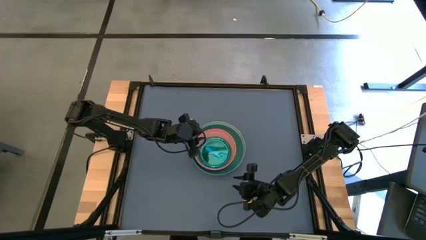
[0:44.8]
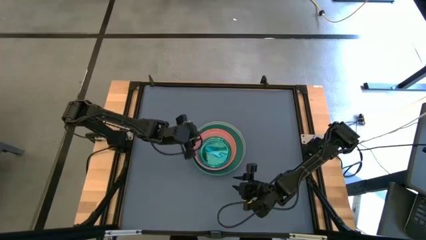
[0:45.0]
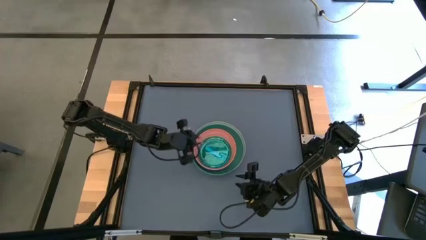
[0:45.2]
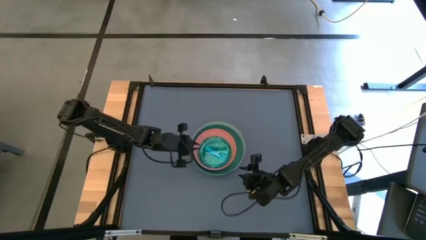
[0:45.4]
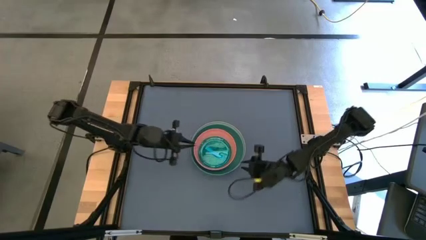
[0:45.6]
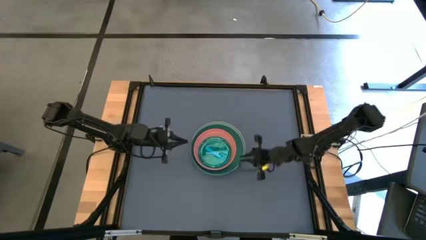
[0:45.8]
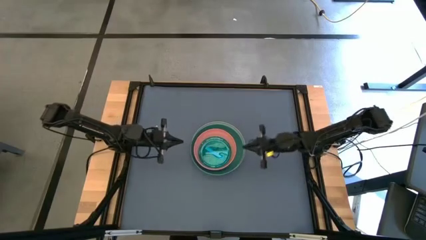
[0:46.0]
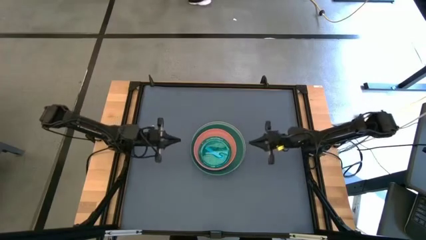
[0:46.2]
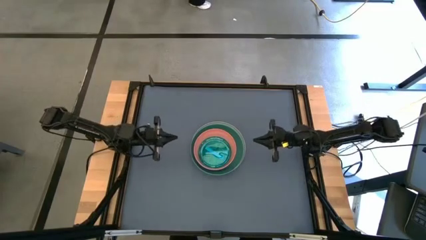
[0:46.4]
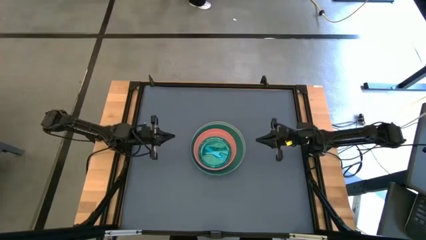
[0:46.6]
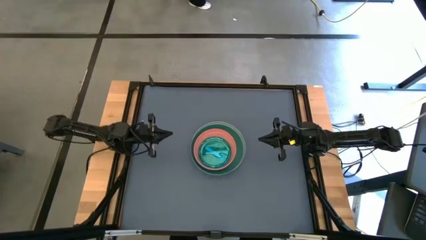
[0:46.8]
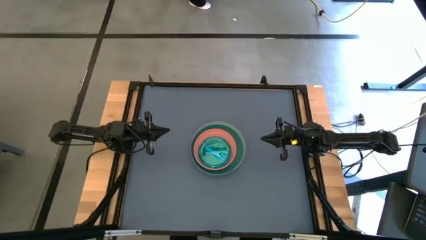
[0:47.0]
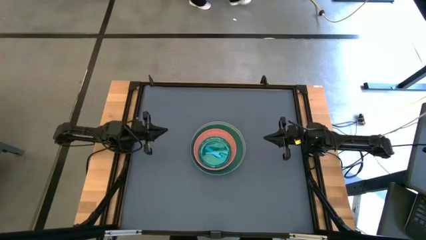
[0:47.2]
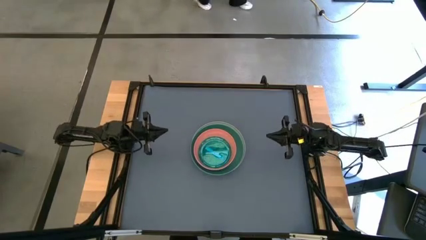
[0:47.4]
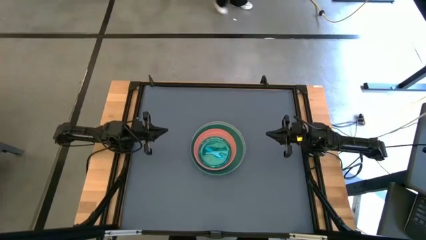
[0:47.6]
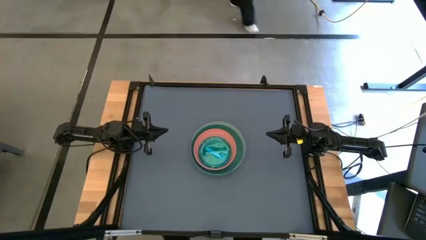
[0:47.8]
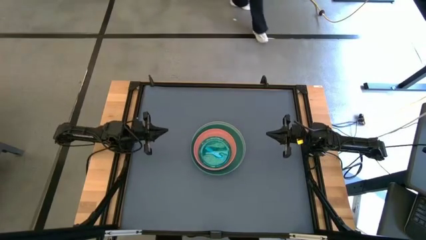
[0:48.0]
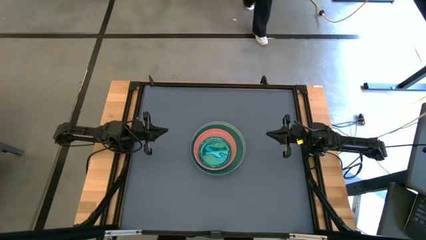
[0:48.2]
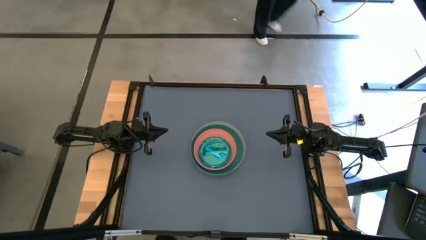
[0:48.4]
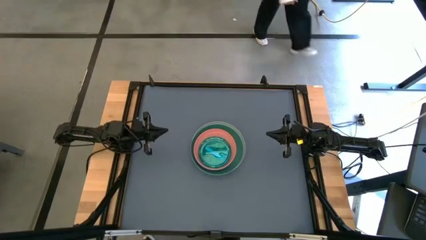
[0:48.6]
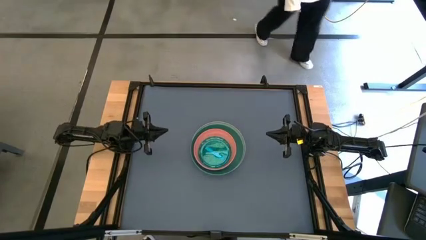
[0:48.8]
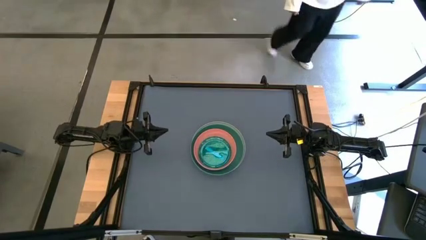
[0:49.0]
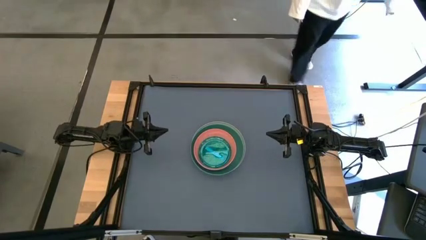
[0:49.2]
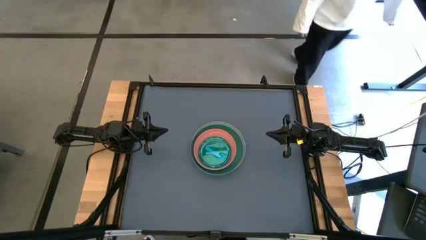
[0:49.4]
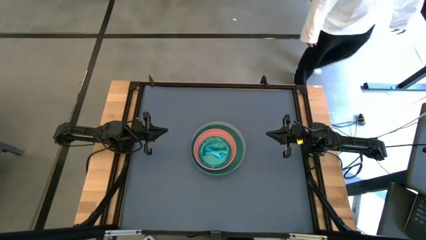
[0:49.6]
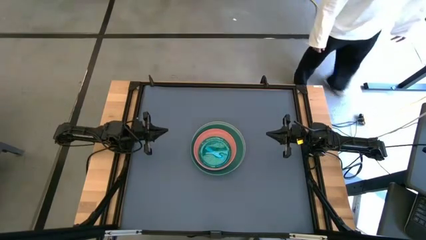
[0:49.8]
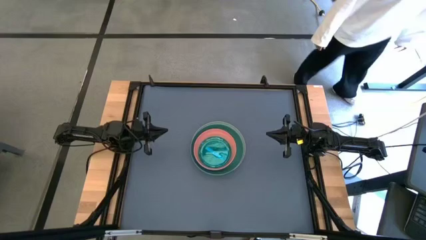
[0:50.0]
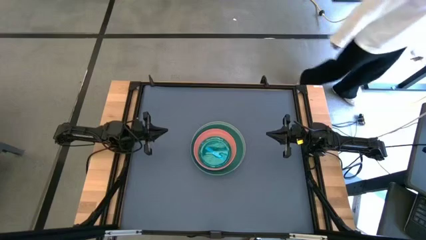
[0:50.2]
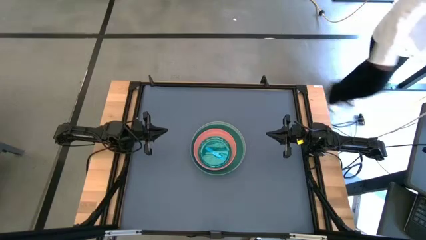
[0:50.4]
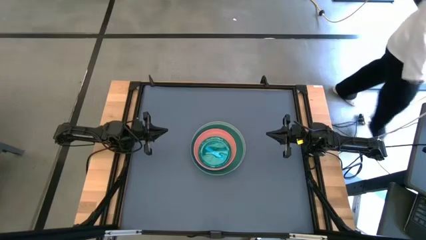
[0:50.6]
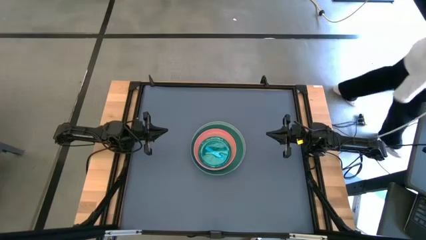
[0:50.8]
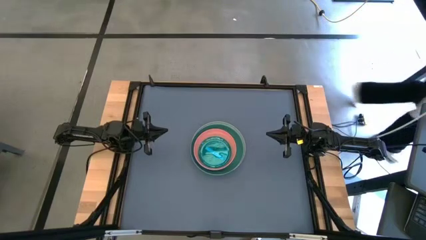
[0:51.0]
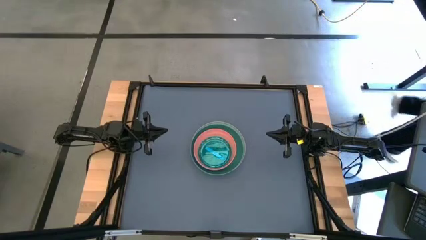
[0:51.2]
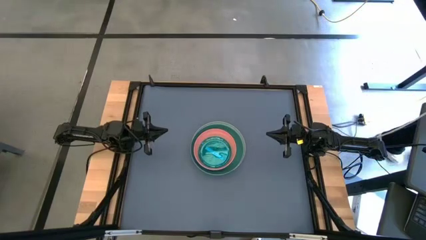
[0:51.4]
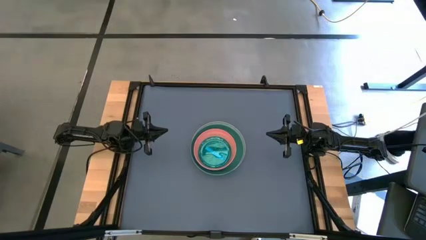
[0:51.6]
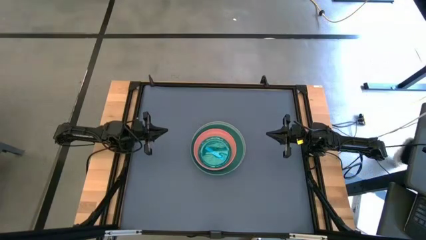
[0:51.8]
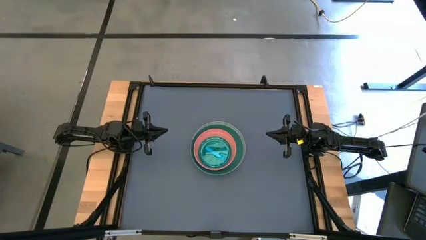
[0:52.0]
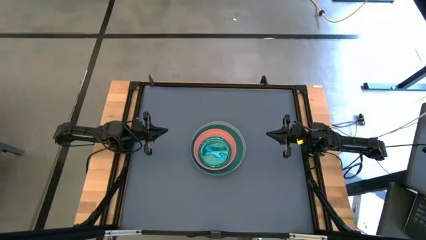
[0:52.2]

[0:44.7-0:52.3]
Task: Stack plastic plates
Return to Home Position

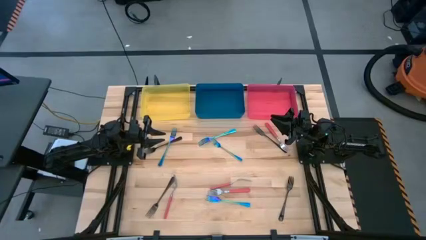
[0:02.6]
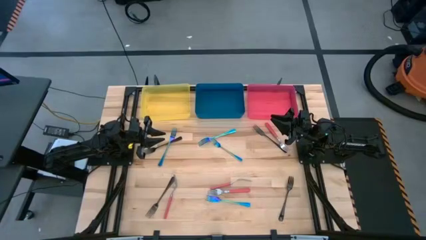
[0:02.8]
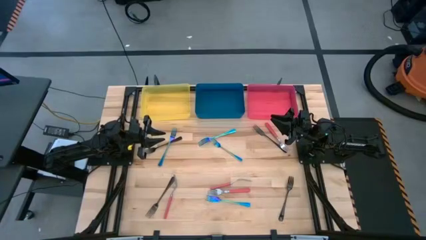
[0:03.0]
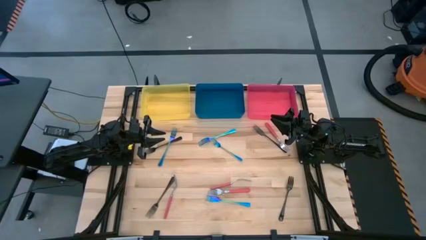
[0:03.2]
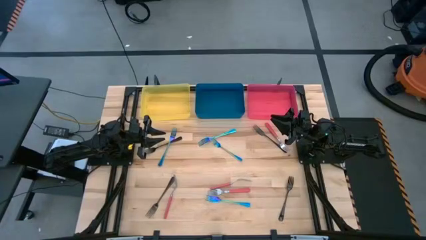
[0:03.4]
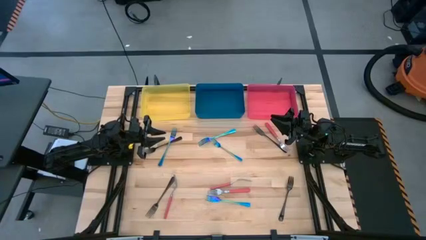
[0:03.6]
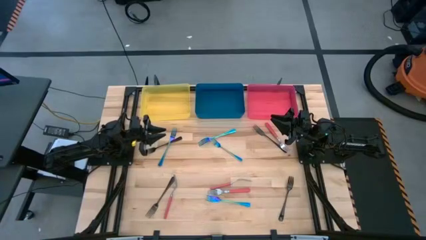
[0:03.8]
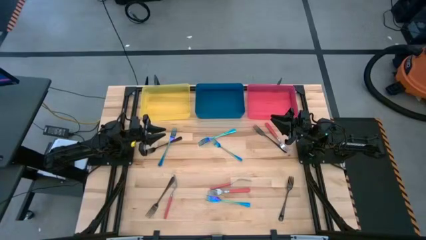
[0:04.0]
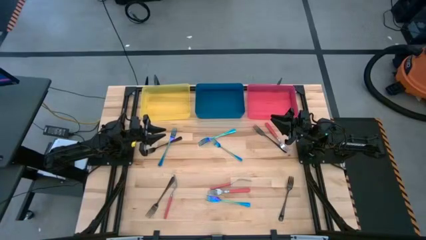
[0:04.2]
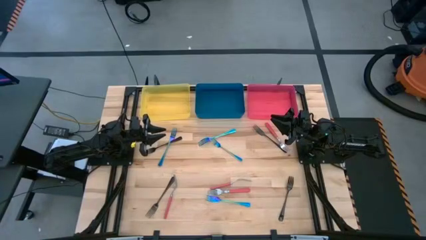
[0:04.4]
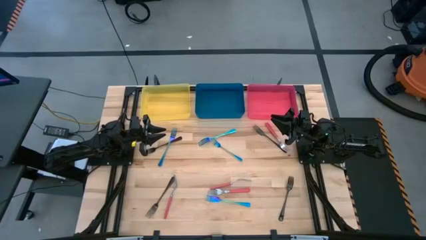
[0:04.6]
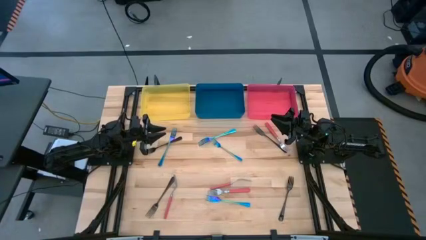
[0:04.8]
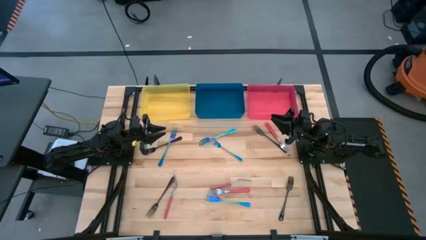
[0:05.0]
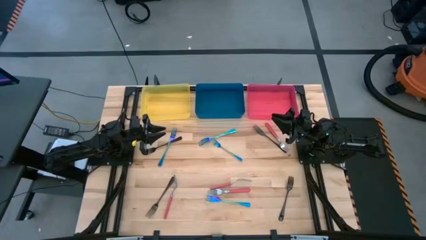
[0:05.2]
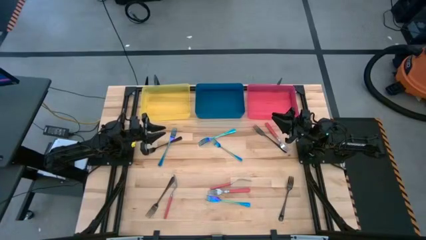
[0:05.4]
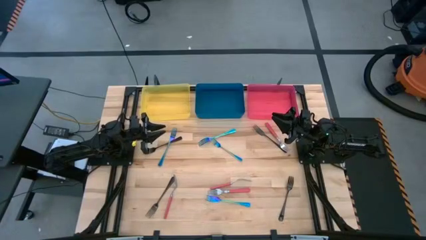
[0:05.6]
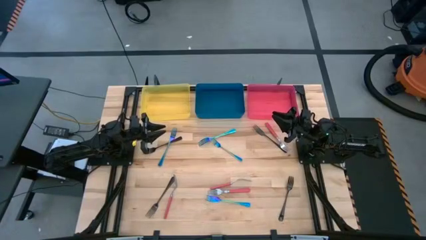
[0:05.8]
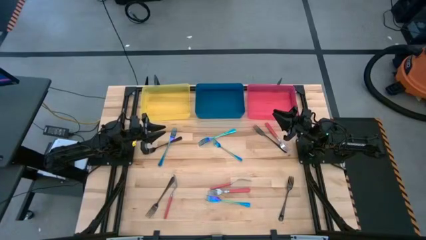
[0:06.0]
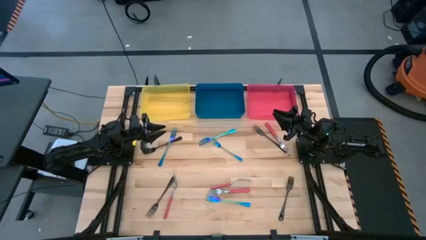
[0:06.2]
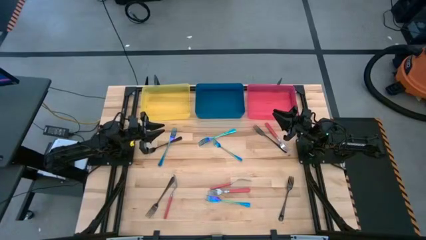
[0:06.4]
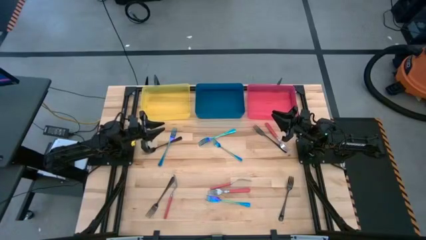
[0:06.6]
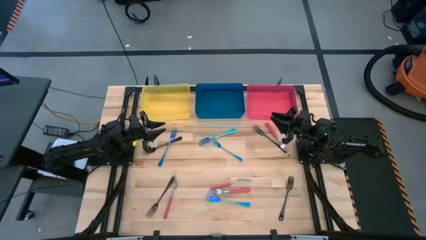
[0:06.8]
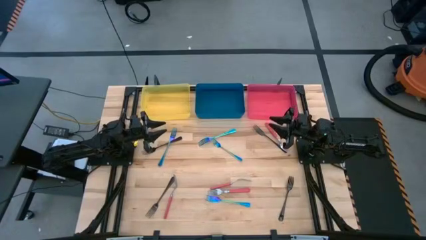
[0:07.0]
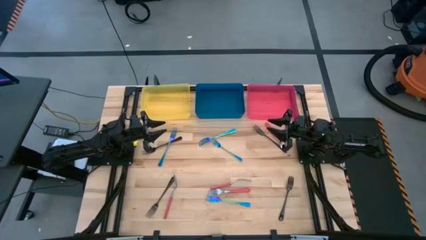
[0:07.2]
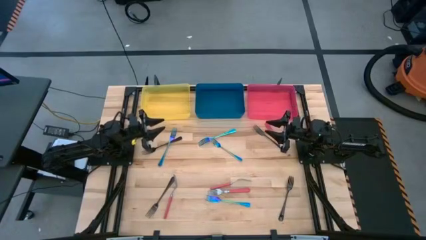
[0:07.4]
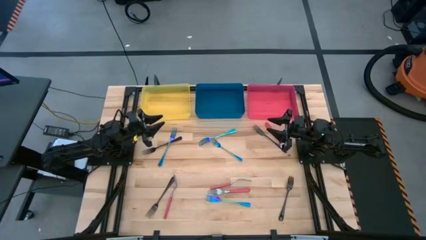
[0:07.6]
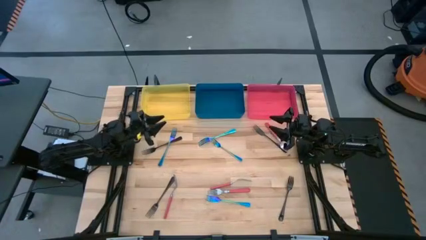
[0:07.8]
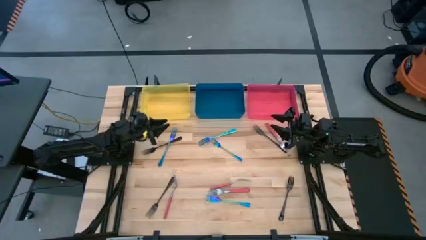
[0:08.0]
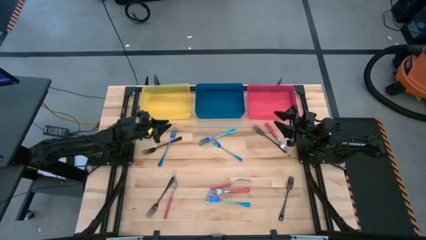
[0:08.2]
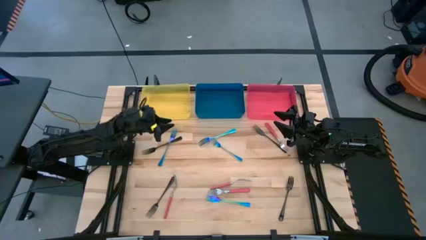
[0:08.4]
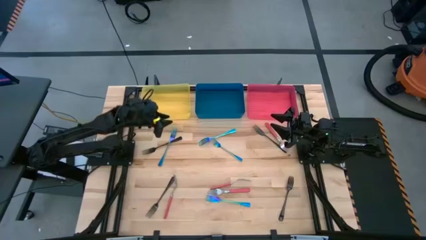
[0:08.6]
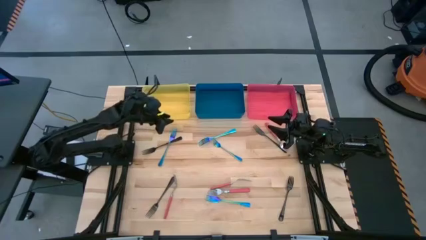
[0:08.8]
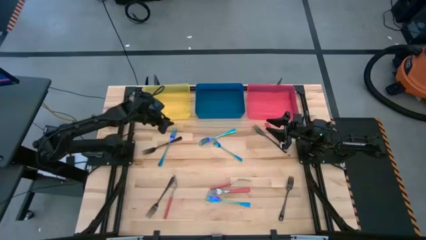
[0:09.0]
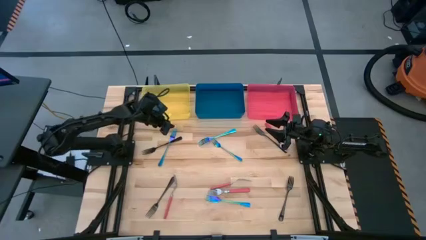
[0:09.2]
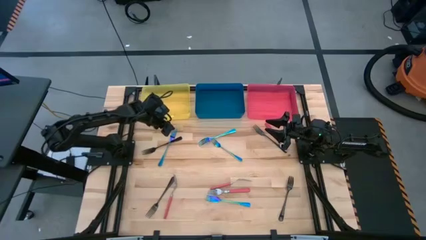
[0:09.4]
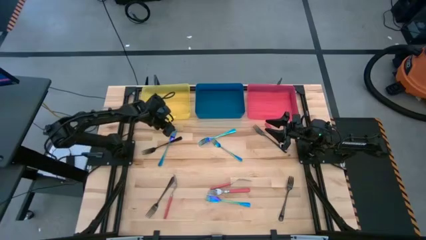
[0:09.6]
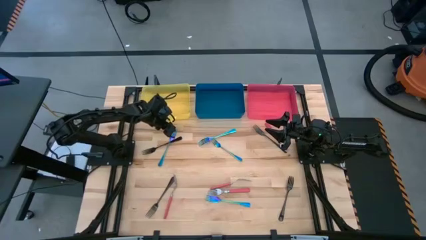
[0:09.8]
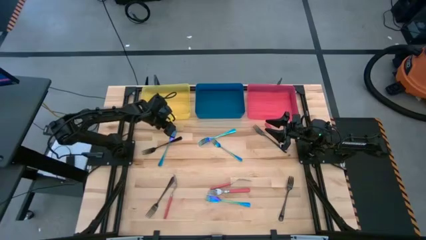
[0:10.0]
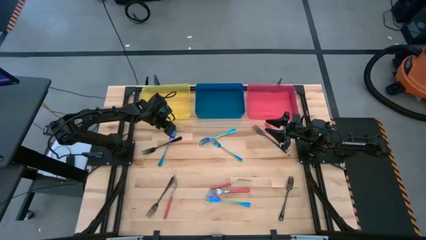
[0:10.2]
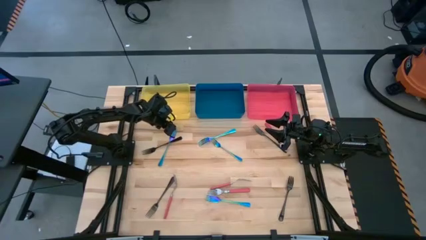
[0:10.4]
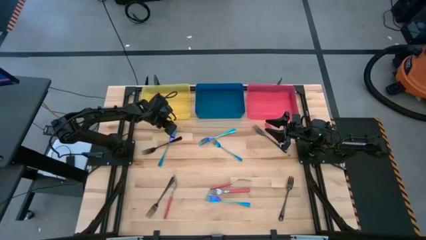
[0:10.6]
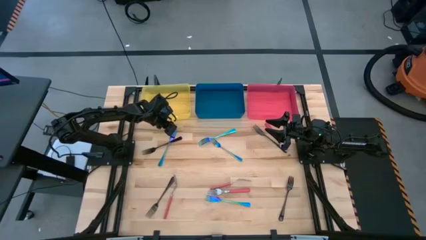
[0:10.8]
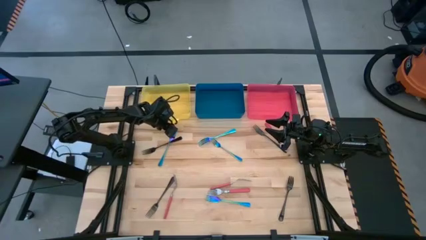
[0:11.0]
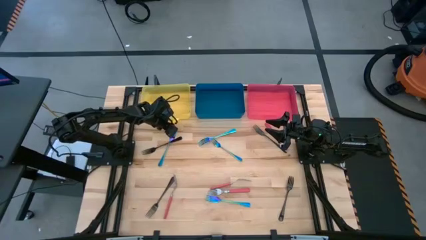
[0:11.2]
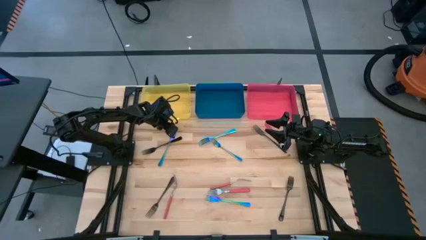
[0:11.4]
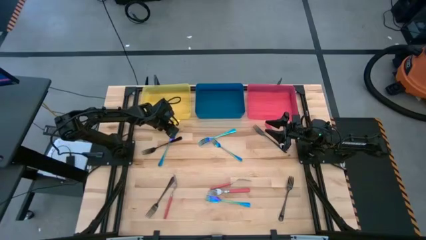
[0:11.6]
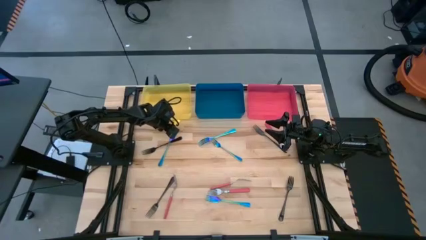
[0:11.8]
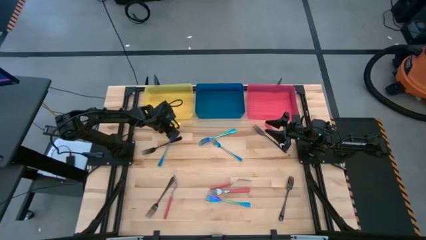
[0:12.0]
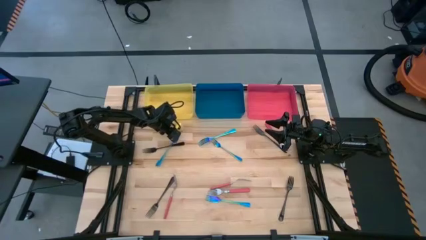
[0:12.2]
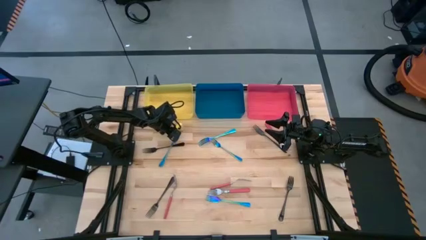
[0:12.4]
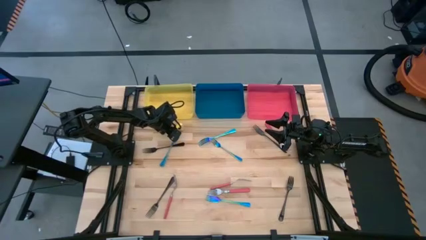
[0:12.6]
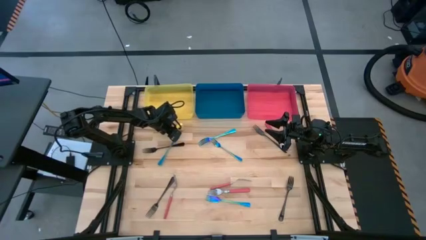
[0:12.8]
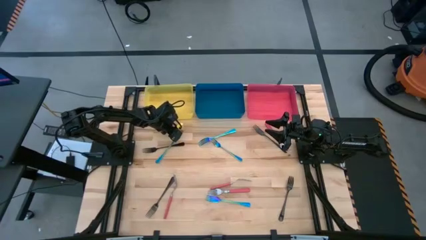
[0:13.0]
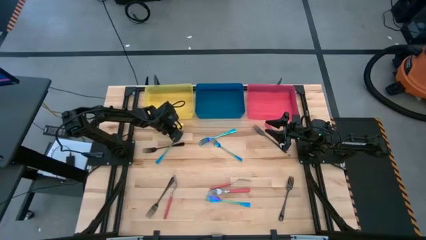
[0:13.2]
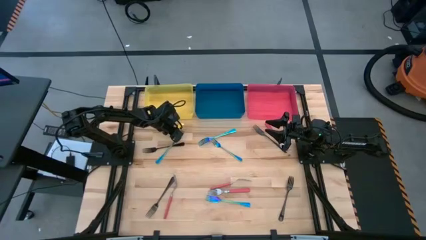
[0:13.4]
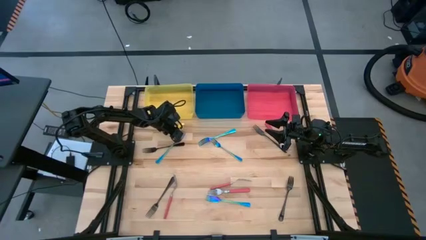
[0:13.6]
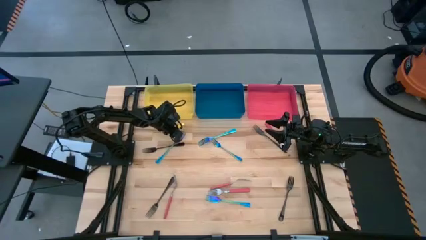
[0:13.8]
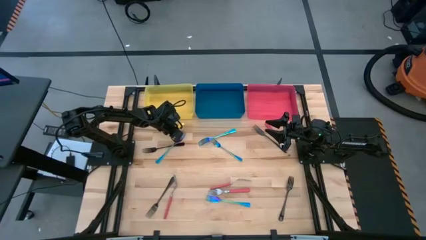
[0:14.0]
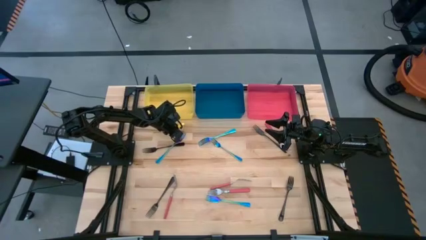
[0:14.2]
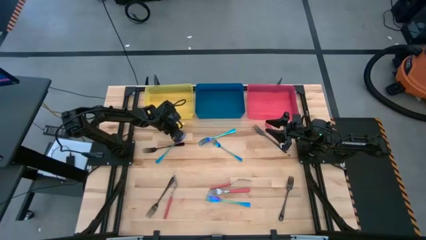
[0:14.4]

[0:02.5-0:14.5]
Task: Sort silverware by color (type)
Put the iridescent fork into the yellow bin
